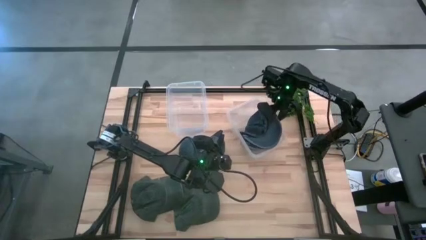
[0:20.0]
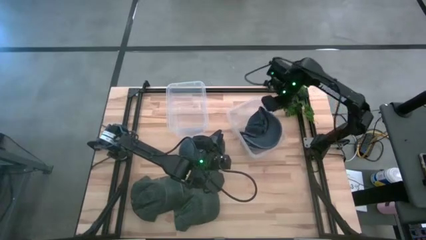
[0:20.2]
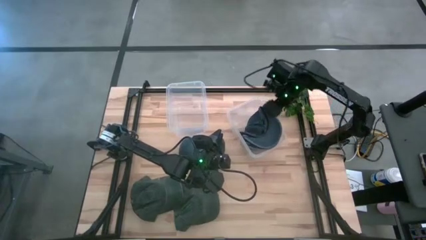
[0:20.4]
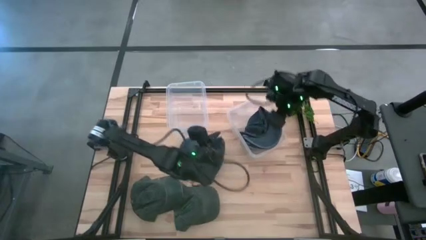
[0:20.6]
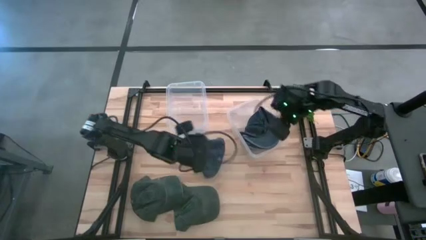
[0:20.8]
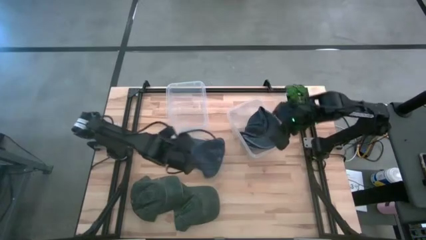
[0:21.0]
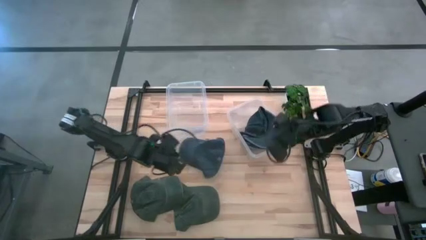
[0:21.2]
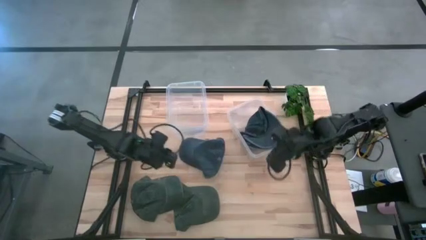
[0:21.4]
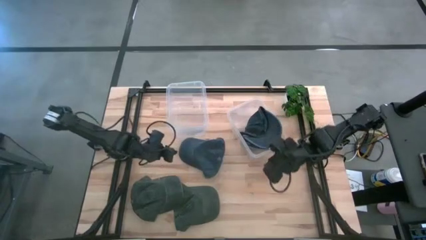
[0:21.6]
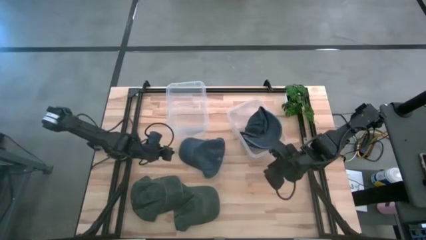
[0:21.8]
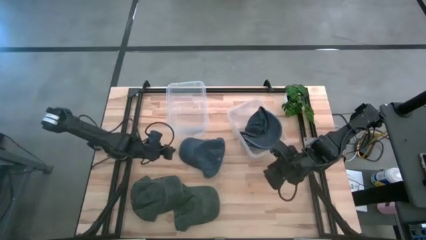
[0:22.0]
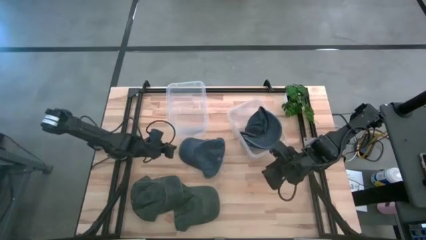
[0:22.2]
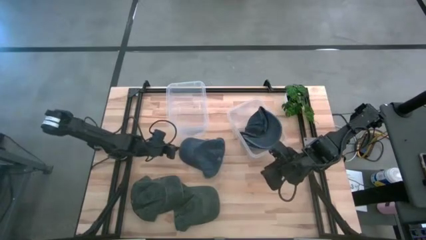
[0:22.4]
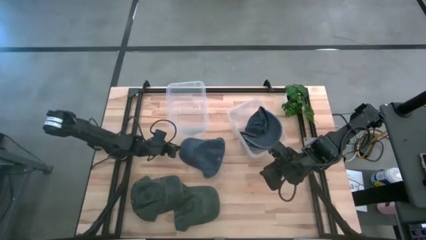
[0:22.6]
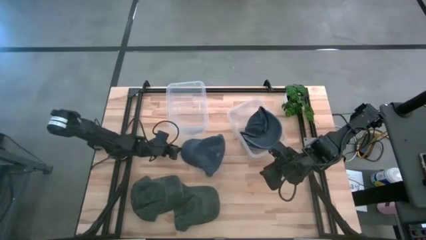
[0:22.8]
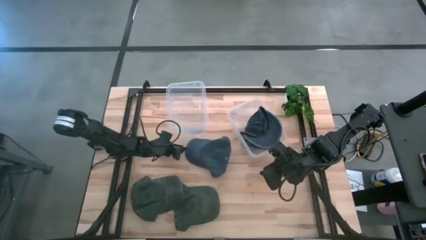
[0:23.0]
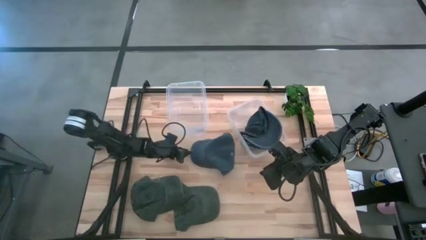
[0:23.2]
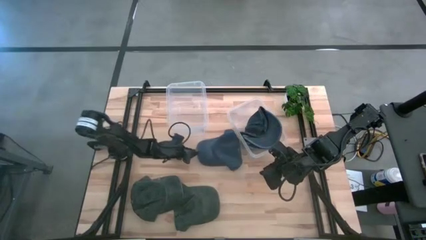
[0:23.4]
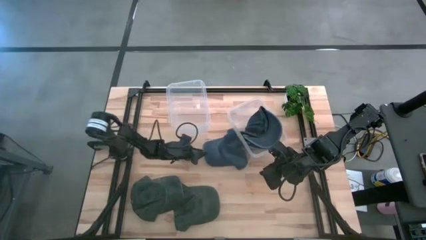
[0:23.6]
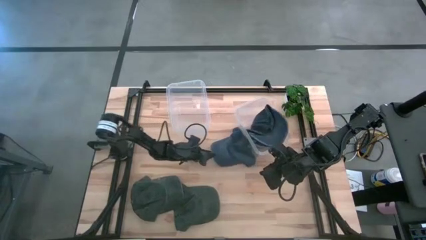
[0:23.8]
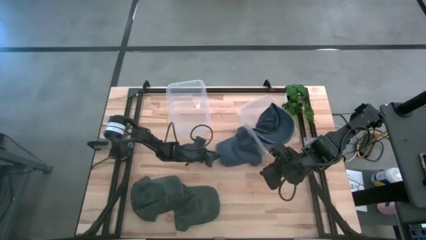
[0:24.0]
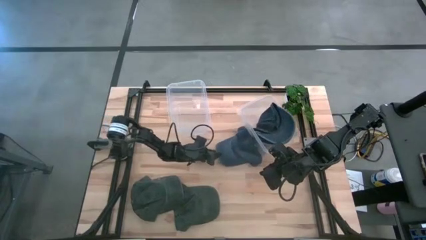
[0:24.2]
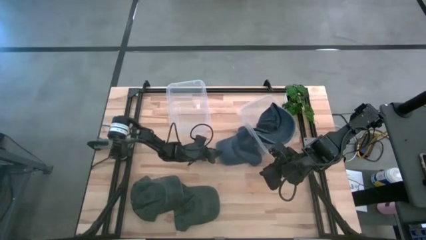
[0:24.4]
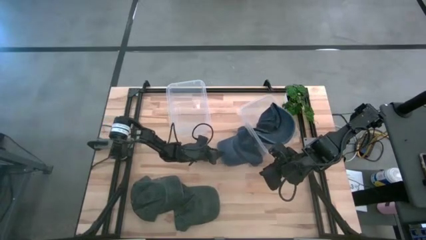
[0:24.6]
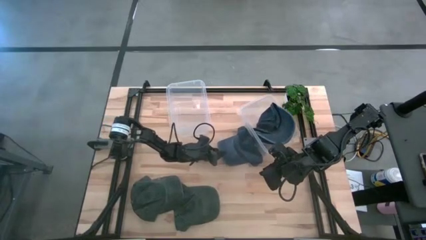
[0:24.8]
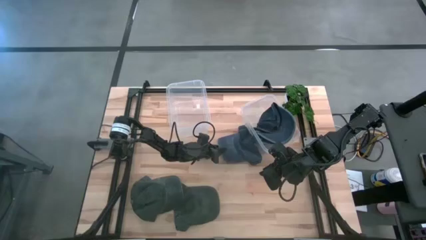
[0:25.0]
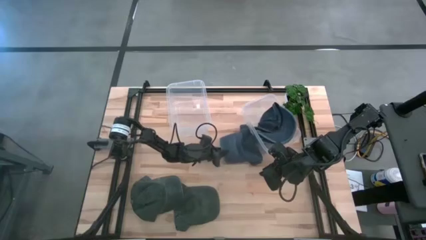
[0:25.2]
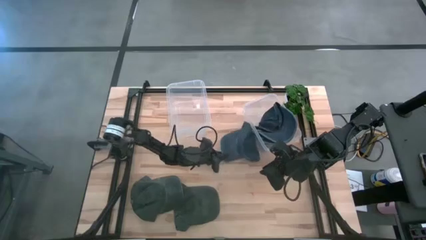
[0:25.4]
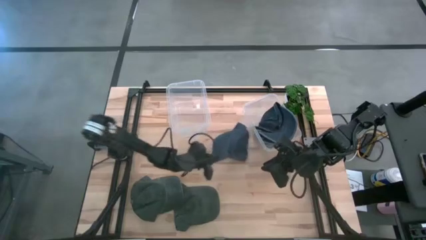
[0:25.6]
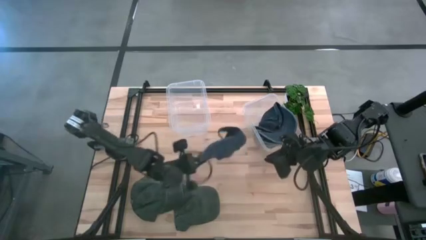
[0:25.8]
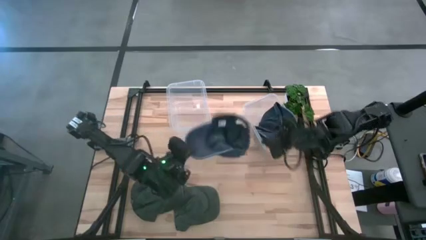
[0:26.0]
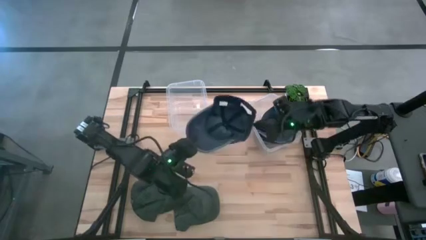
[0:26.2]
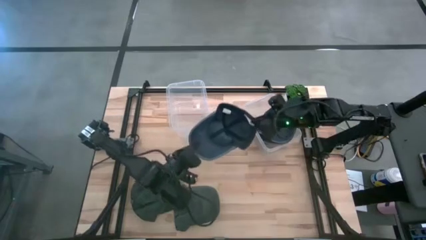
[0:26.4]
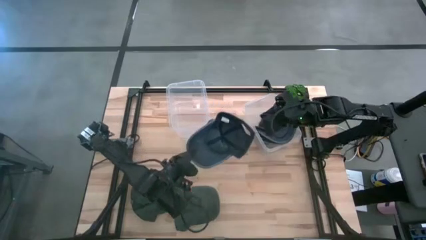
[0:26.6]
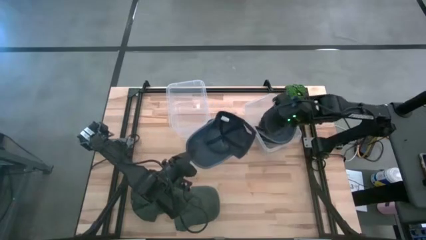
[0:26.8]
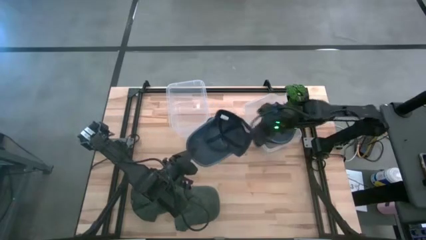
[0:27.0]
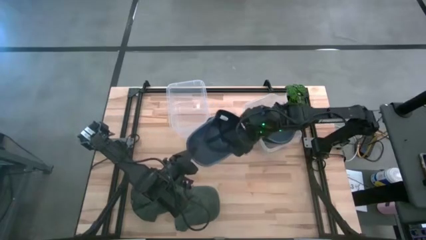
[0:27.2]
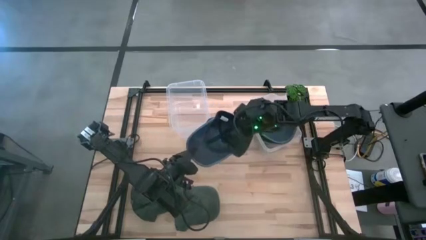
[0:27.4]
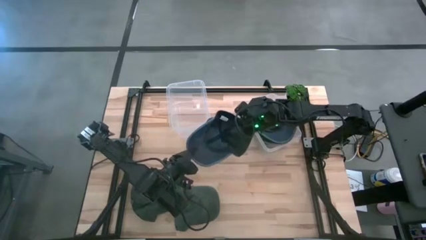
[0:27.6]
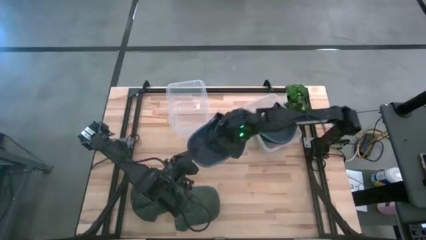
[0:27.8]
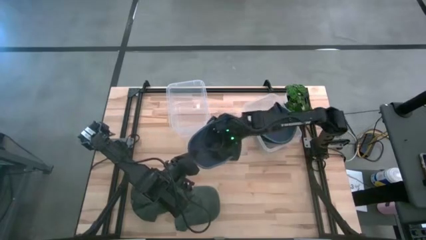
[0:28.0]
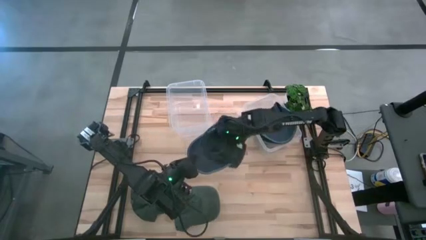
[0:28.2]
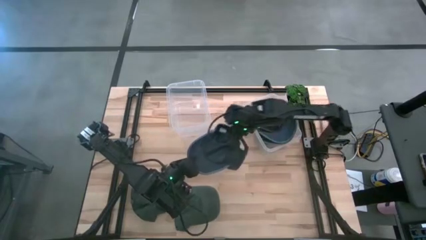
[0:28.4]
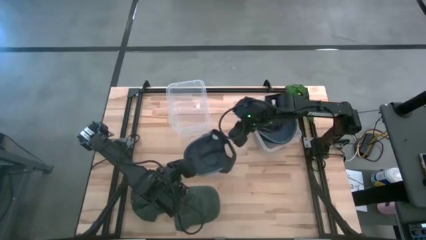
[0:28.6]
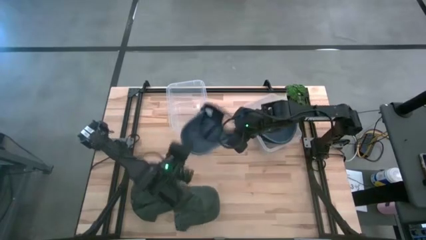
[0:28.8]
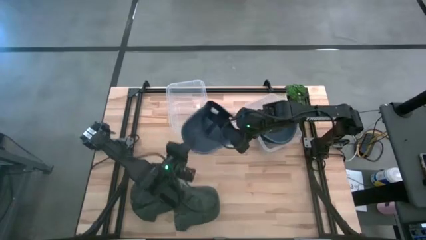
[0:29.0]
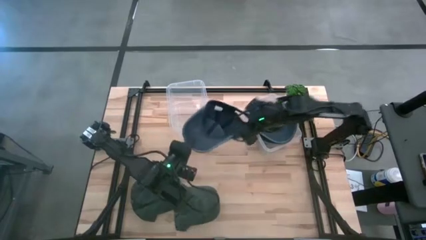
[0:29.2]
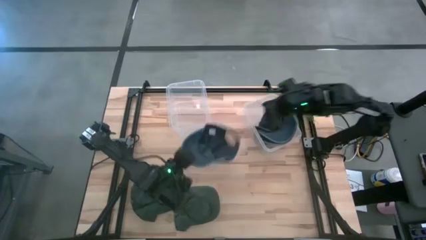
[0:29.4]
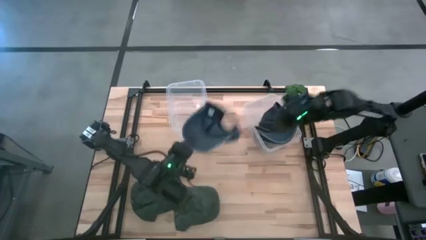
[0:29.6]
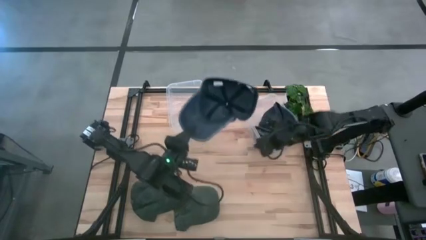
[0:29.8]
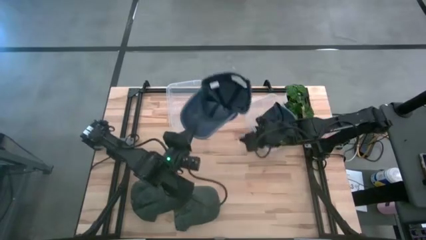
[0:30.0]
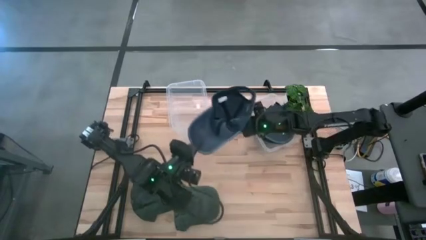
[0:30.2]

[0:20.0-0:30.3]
Task: Pick & Place hat
Put the blue cap into the right transparent bin

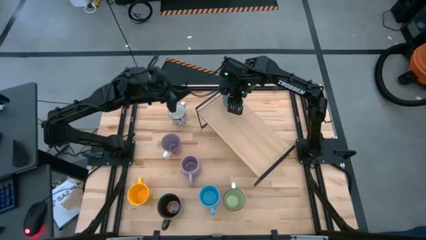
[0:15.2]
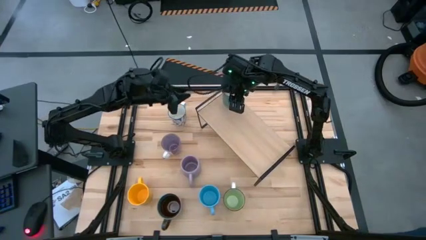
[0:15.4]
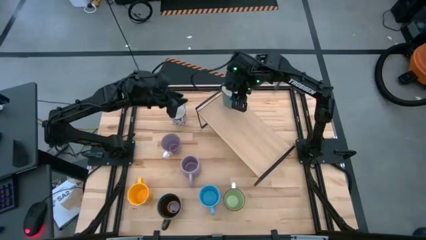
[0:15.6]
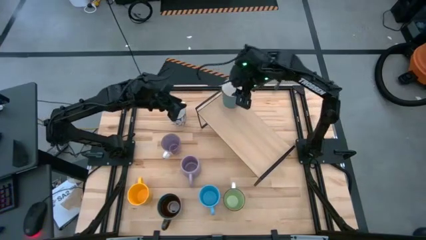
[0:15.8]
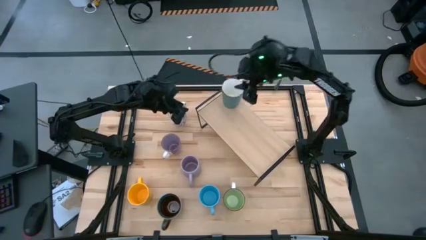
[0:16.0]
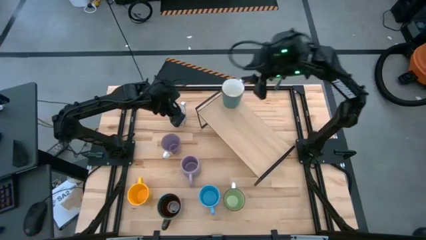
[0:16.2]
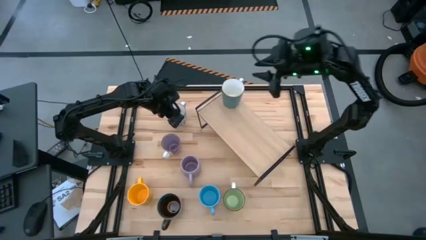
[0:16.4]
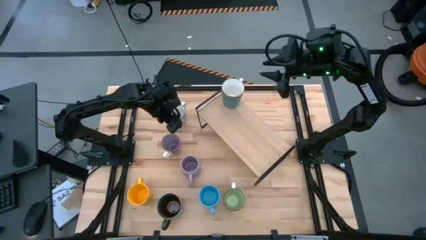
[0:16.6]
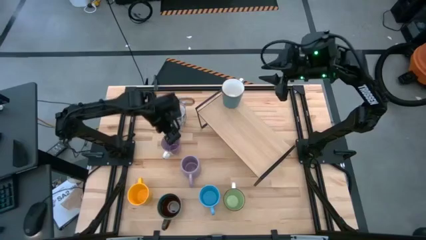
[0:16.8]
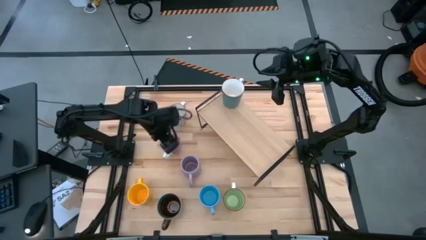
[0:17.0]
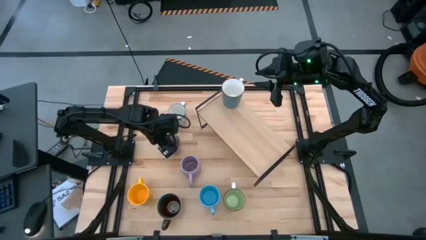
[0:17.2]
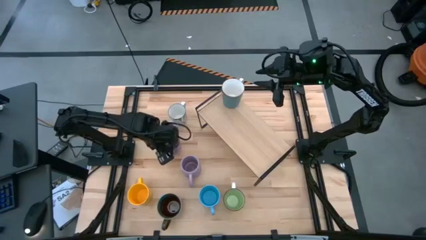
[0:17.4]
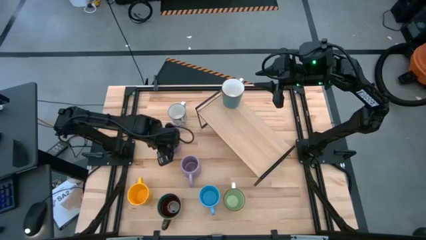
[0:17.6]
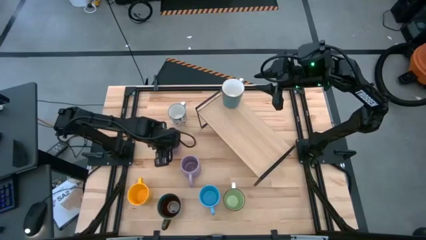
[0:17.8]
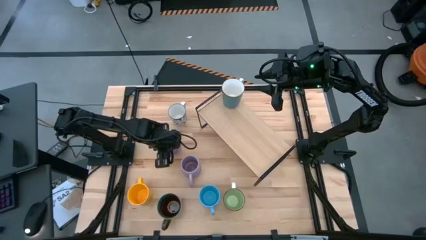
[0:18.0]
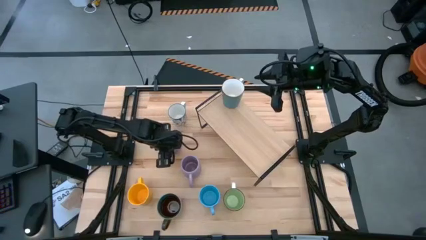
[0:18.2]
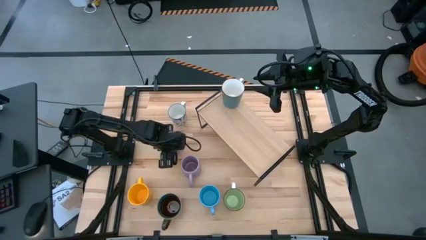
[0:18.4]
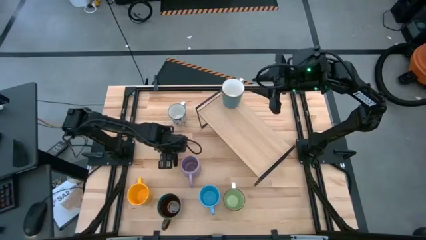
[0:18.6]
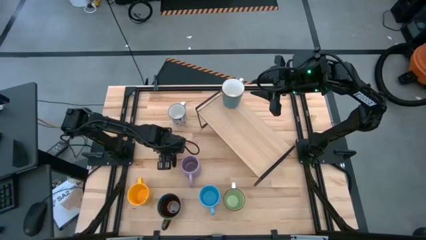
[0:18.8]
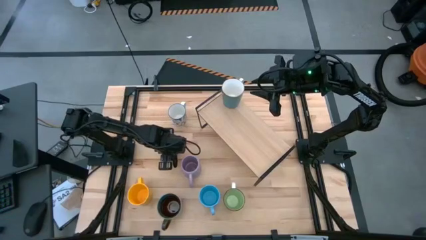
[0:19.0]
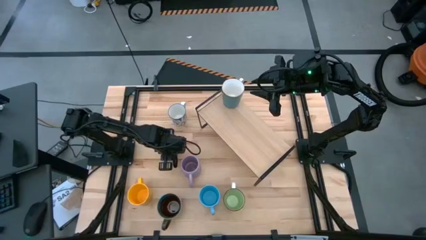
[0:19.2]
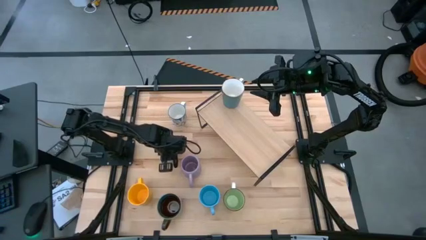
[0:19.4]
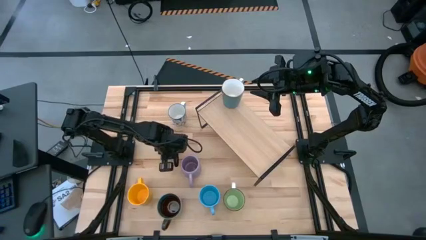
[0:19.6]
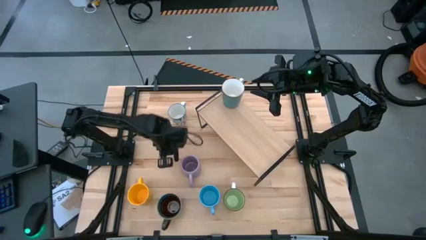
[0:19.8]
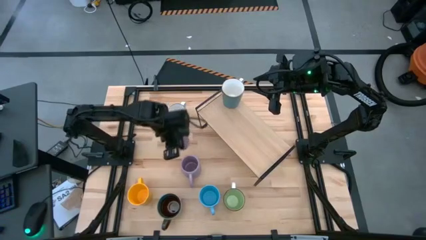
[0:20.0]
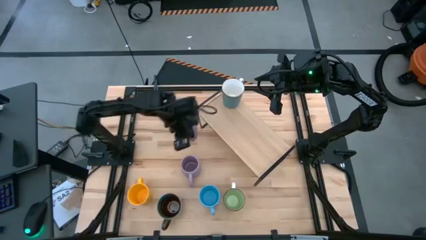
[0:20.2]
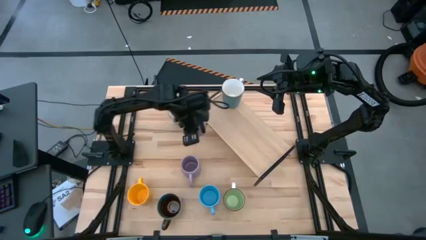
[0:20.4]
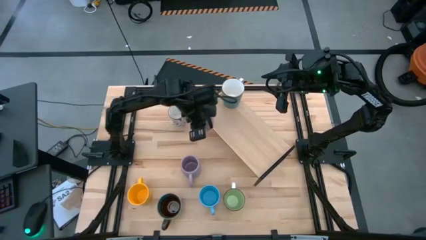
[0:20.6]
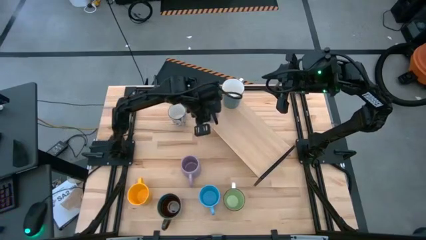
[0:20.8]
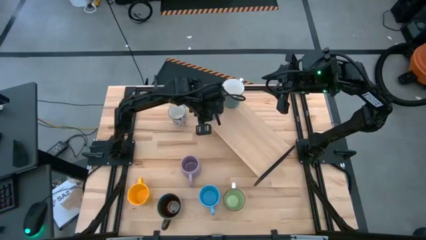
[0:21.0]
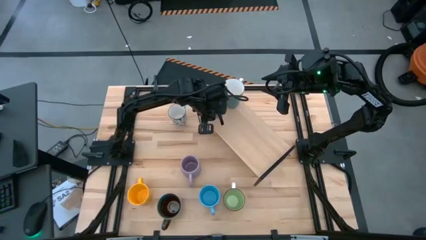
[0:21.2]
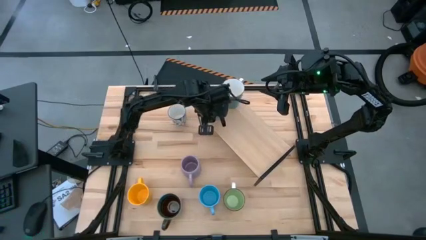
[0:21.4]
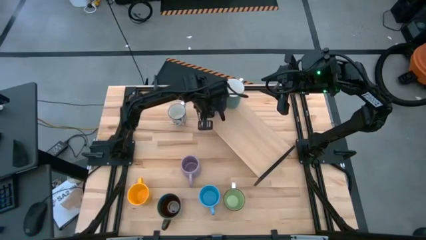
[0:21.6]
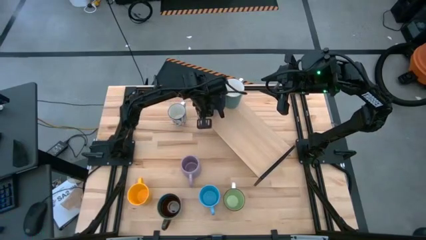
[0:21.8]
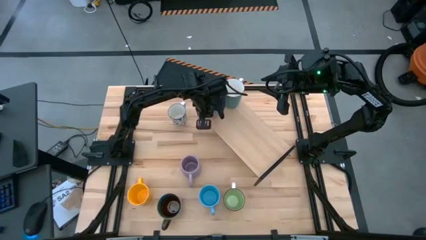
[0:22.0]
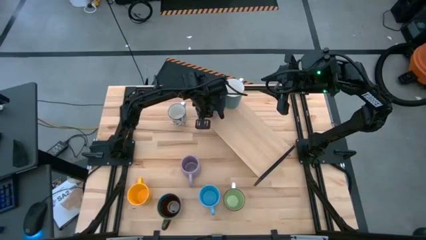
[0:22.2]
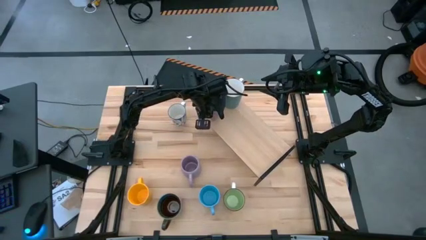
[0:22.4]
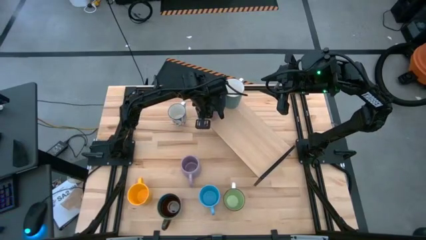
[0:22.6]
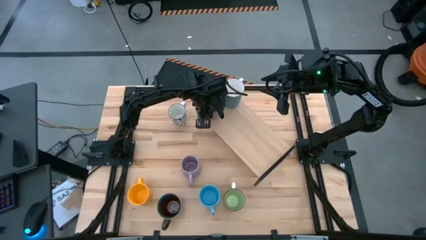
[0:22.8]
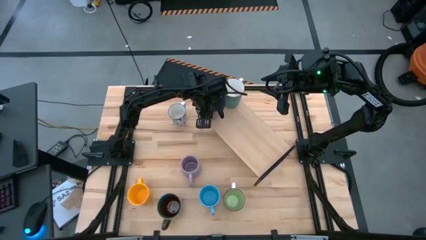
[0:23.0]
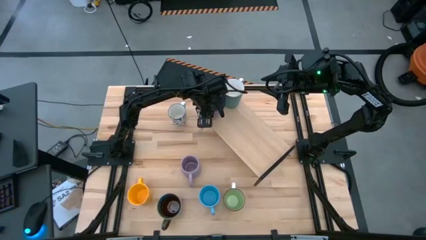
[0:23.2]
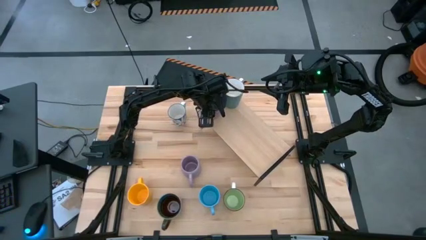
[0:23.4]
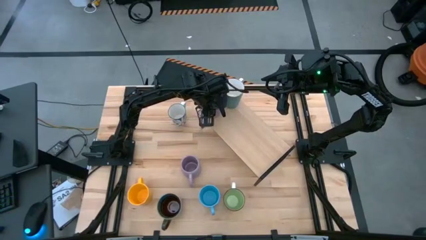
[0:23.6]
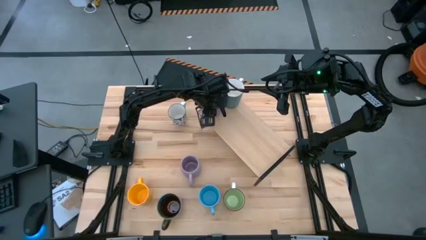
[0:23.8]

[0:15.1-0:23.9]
Task: Place coffee mugs
Put the top purple mug on the shelf
